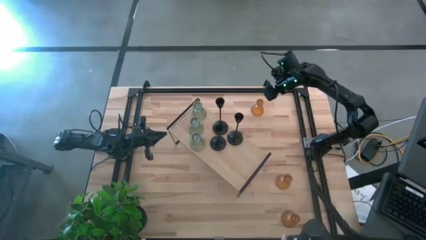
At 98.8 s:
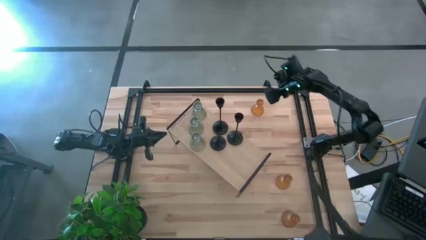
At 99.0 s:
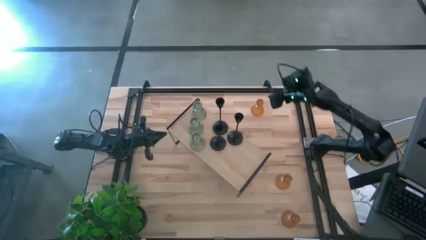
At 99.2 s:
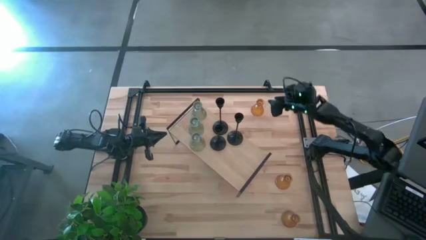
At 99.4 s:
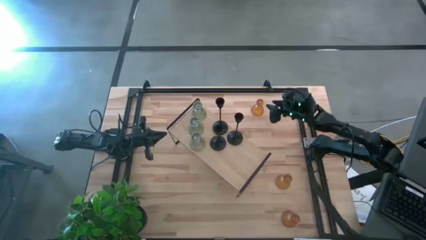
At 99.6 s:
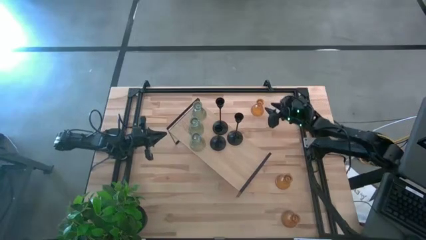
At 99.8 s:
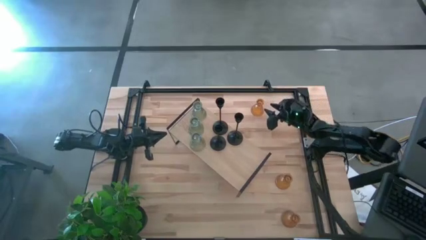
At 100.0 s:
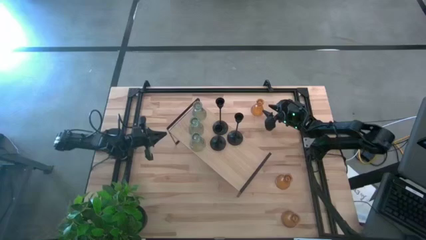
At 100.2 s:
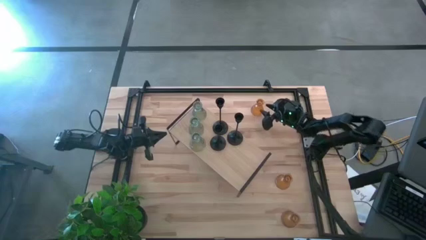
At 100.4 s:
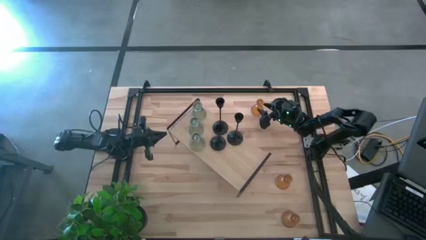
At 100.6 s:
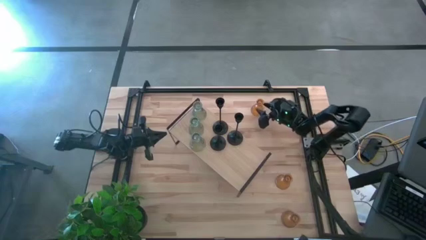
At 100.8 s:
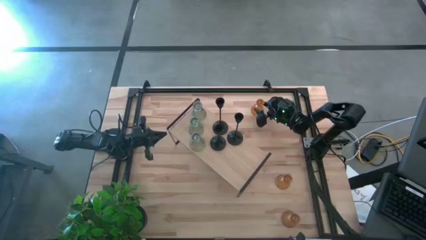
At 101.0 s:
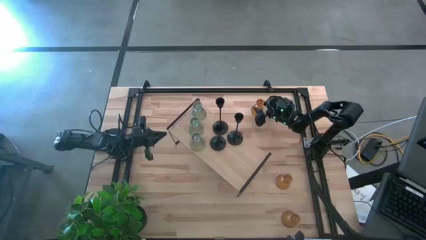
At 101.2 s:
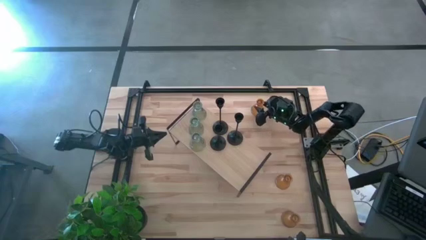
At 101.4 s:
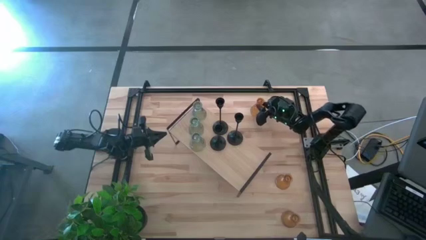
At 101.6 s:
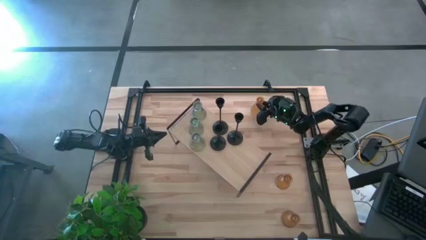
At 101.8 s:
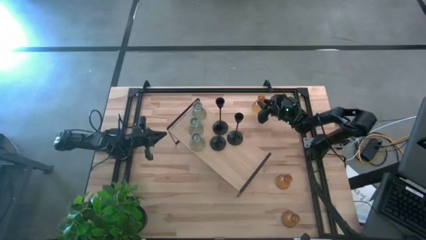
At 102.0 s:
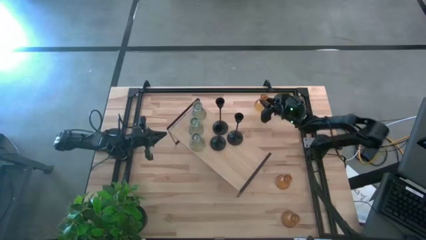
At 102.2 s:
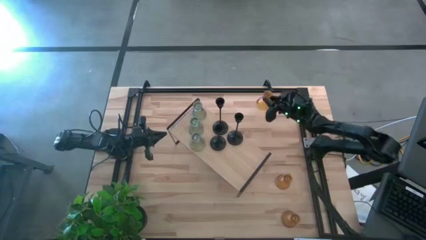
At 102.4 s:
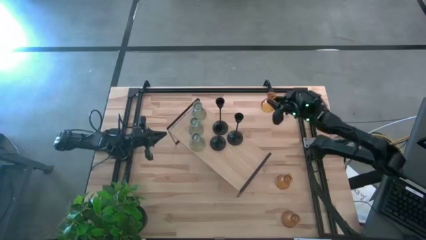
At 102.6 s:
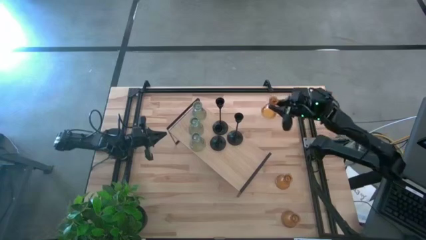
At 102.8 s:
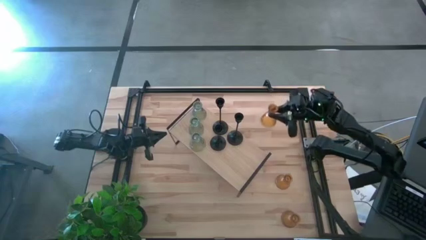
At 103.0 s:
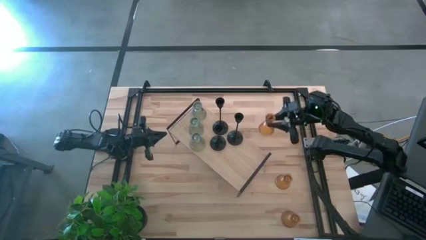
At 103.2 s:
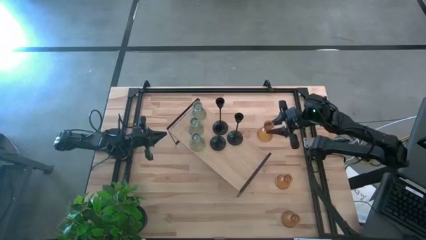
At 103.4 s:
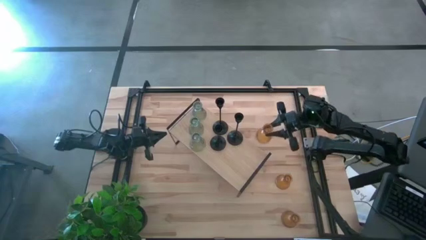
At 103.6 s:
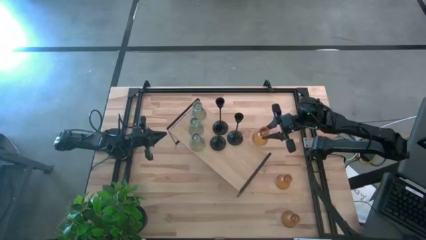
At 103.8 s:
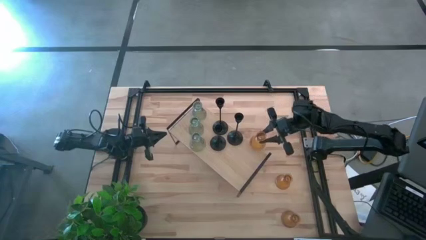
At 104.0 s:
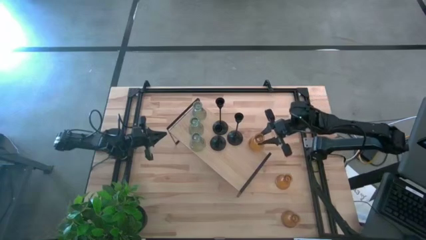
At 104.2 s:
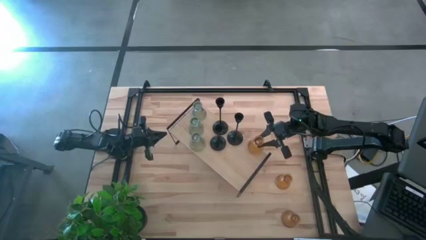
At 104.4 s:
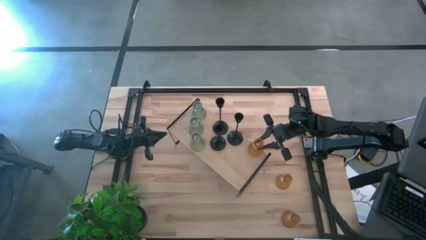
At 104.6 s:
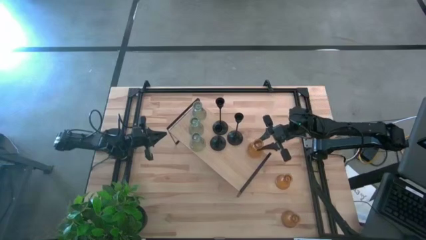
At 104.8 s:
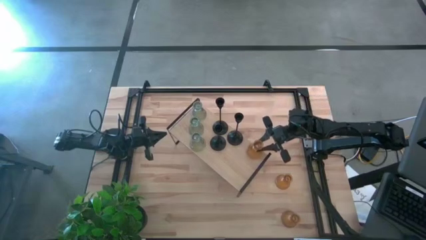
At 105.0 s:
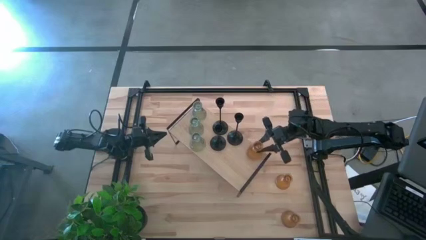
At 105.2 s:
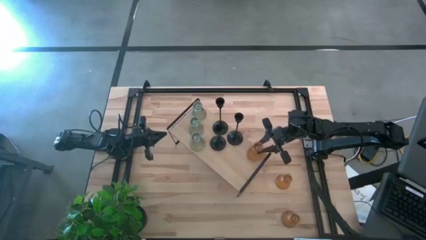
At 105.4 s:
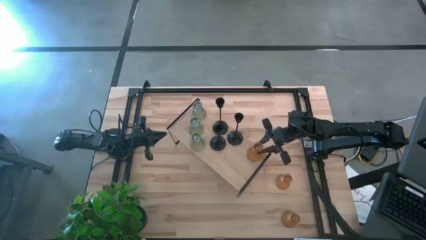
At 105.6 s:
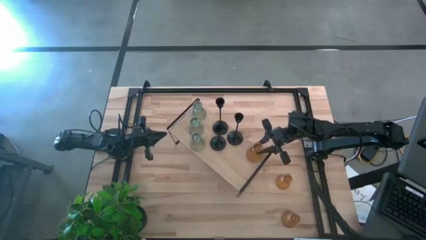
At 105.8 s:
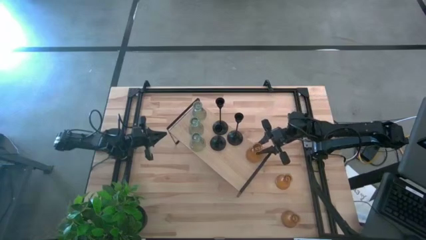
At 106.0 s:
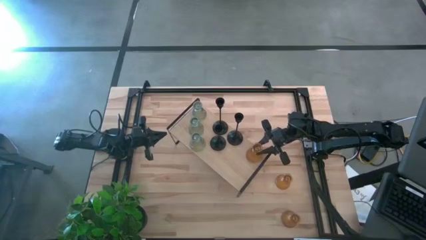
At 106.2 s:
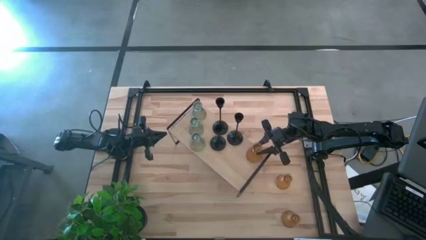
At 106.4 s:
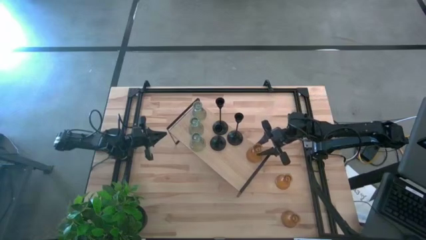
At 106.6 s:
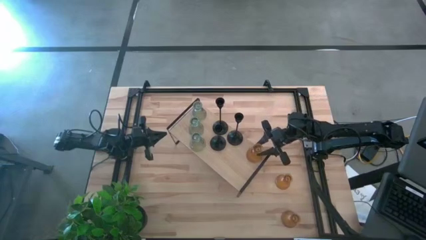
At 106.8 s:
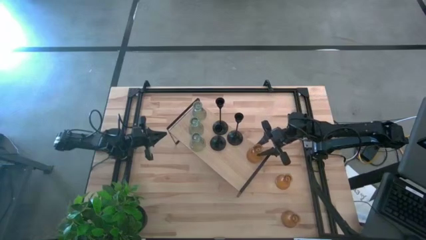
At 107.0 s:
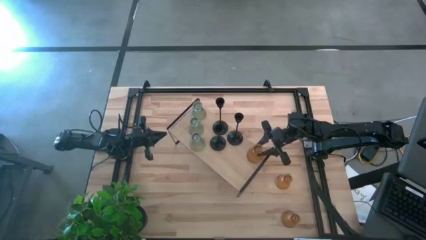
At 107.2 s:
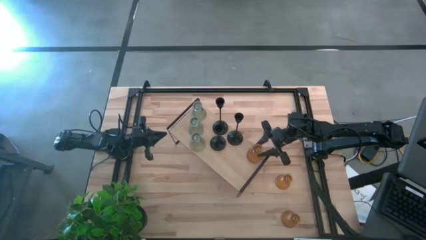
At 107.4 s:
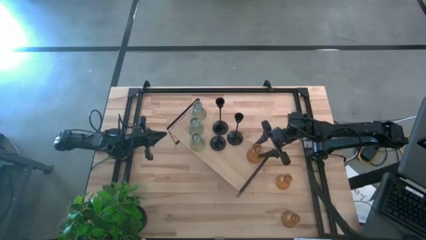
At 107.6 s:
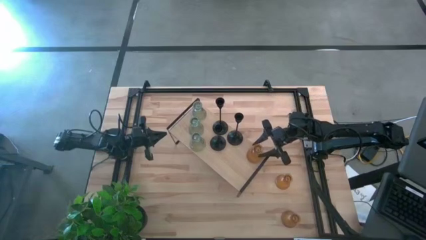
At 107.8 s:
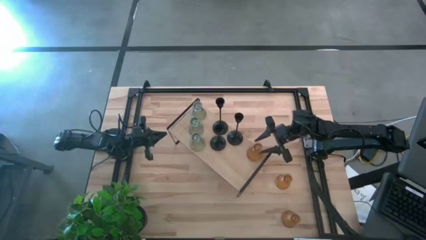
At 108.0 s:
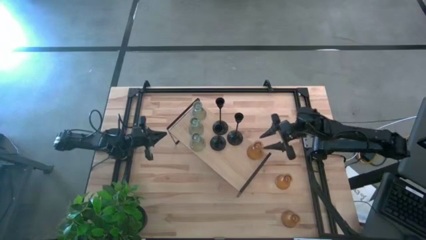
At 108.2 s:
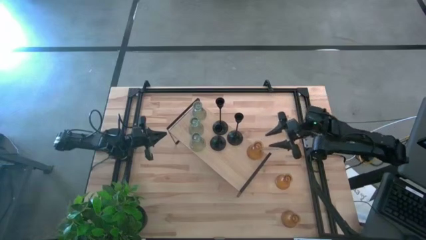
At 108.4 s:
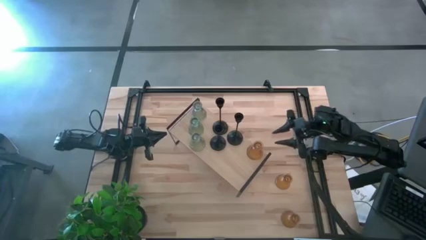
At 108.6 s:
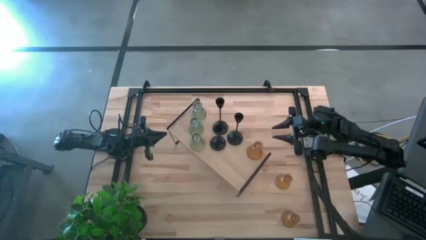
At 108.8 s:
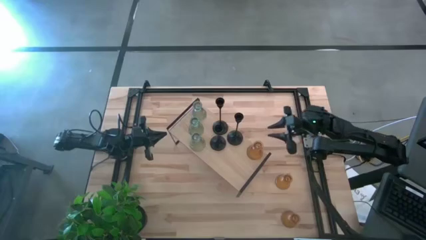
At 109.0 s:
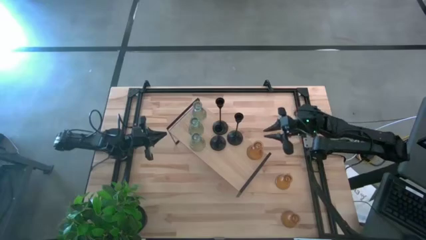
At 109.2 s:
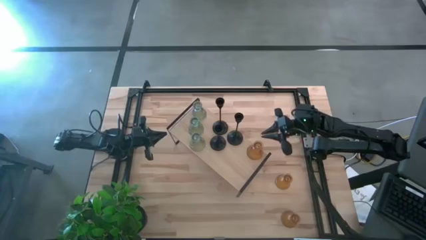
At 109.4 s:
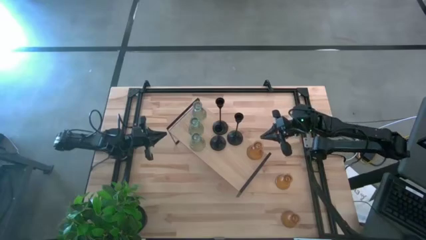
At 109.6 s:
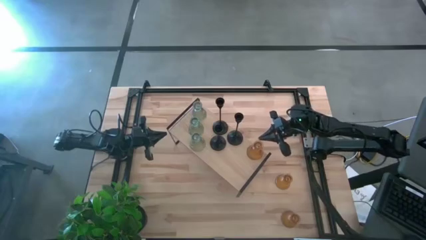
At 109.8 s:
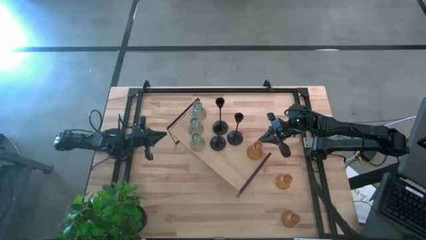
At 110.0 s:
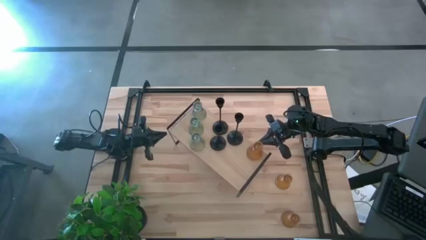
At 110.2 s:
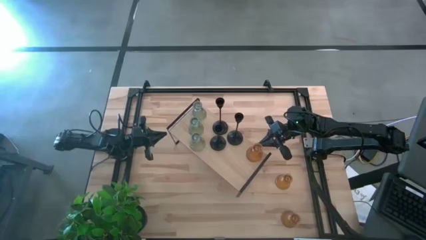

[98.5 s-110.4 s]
Task: Pick & Place candle stick holders
Put the top orange candle holder on the shelf

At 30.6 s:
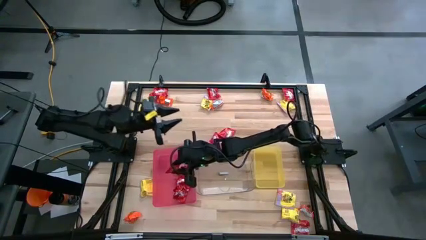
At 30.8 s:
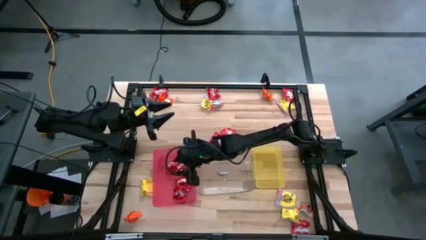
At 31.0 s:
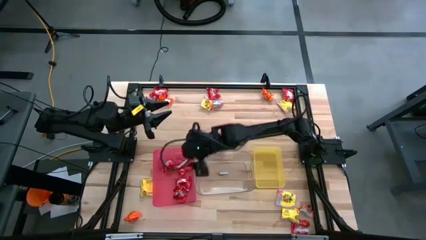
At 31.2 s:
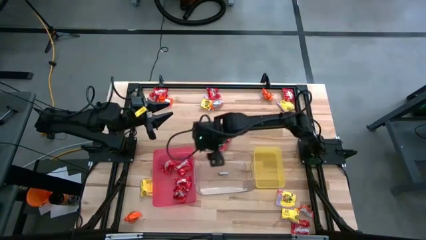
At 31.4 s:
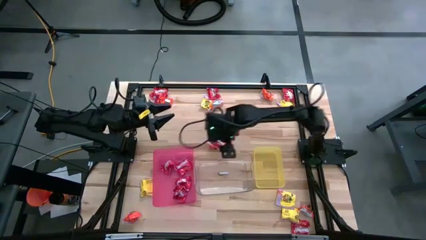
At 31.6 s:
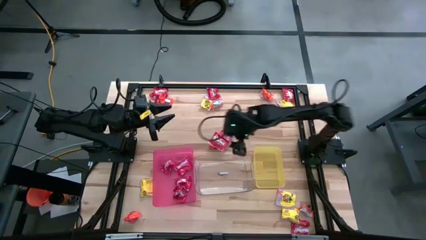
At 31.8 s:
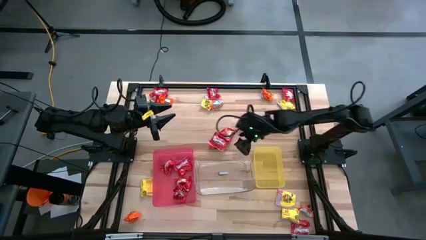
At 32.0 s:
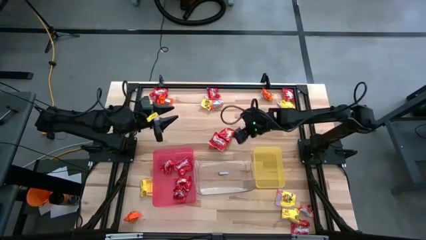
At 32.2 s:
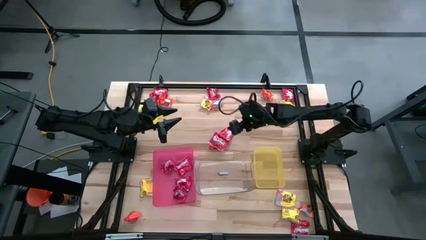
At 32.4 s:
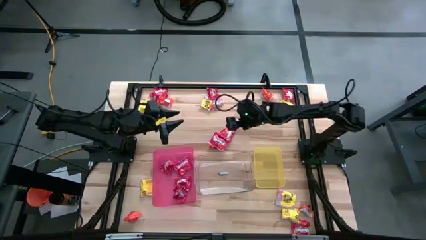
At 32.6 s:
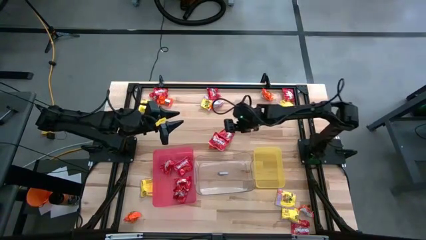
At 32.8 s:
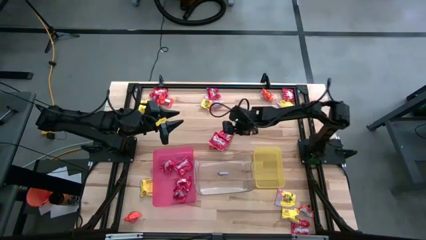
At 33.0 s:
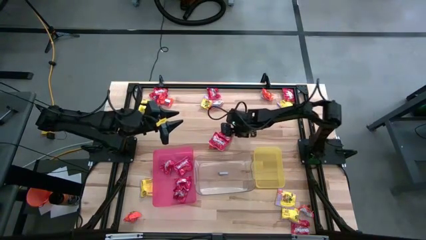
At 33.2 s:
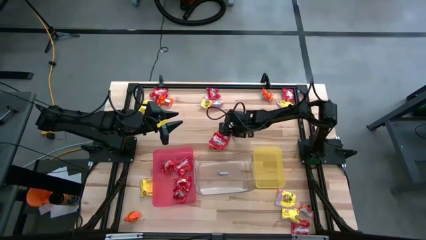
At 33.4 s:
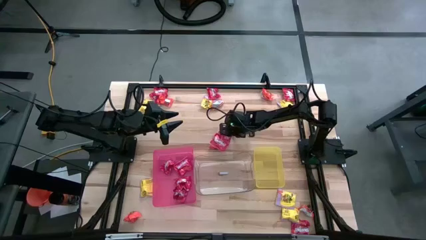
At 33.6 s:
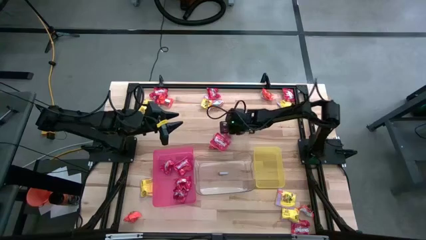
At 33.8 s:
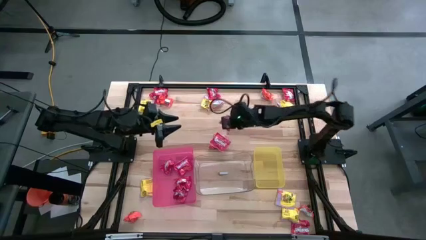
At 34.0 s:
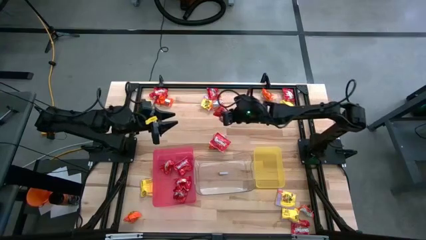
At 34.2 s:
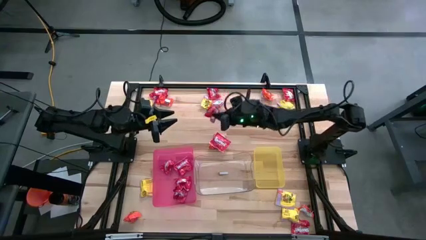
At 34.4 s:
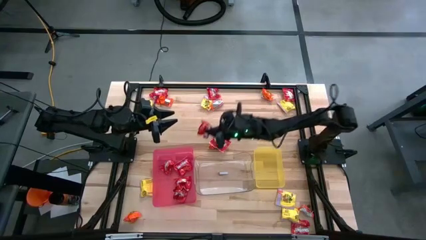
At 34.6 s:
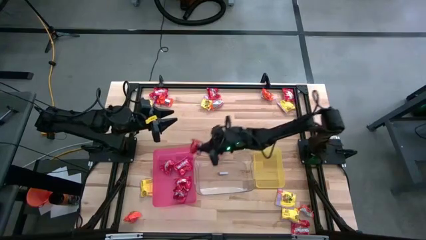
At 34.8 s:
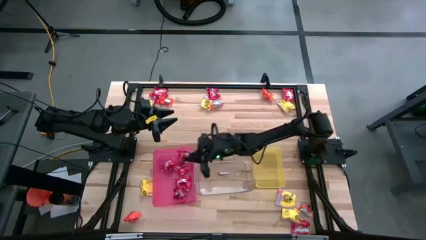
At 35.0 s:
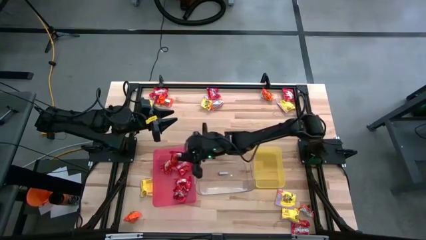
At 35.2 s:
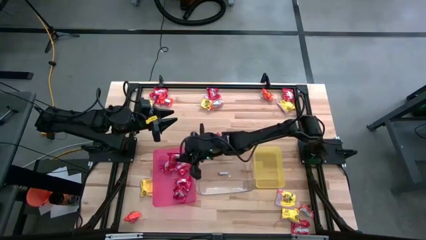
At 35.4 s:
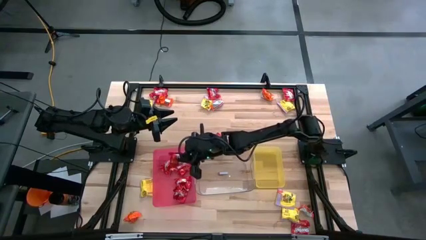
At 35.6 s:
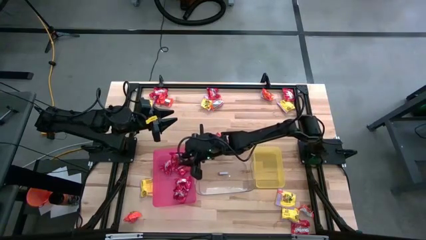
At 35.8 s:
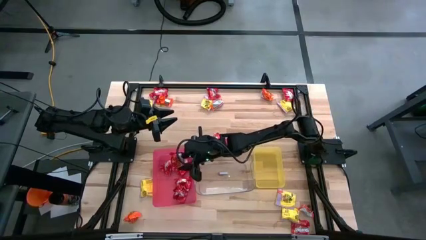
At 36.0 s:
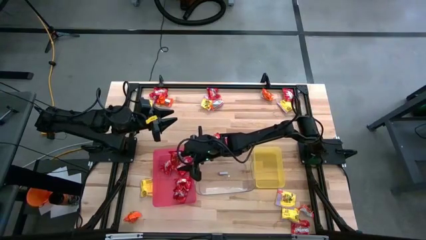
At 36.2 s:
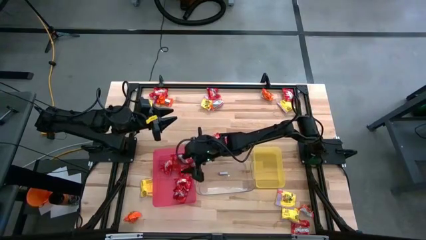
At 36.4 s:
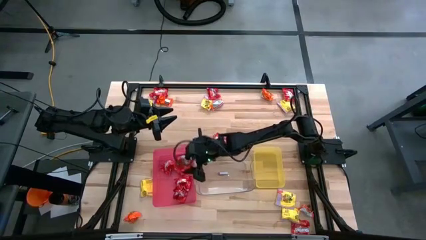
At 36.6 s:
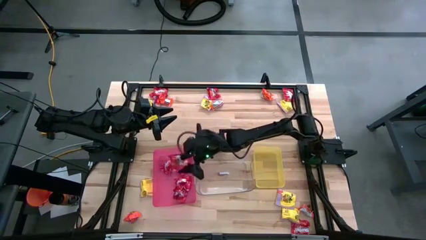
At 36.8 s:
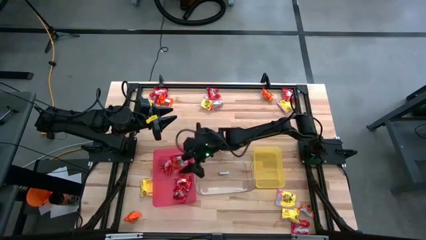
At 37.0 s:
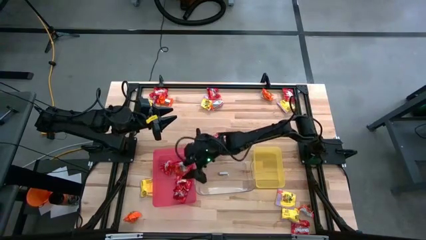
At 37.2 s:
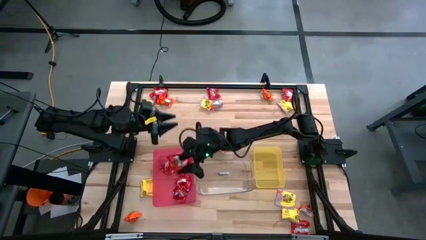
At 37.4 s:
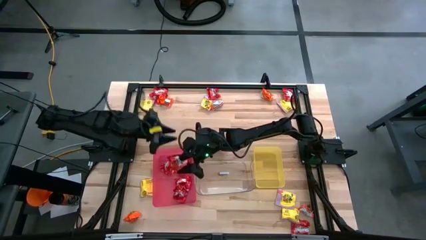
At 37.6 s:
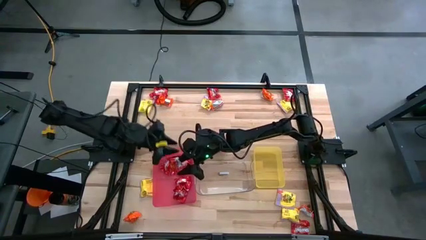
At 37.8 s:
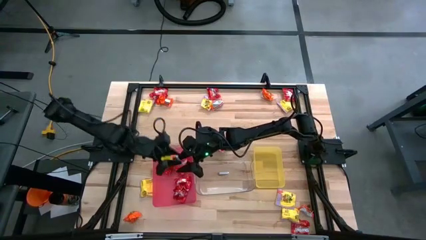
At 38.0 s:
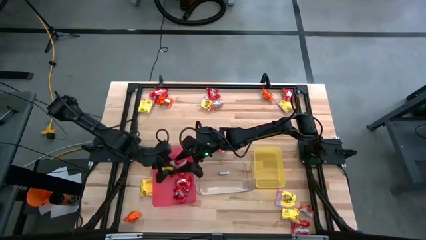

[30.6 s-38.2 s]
Task: Sort candy
Put the red candy into the red bin
